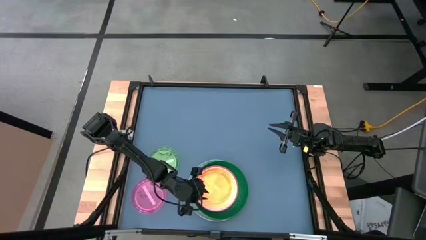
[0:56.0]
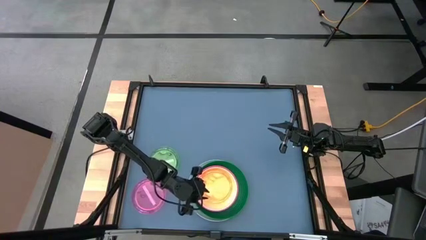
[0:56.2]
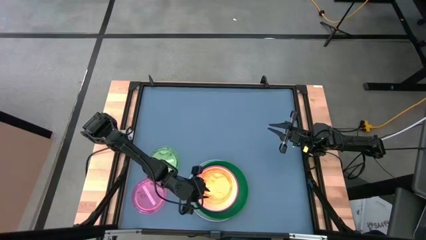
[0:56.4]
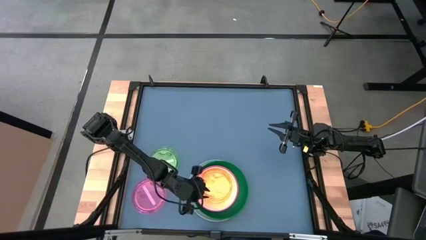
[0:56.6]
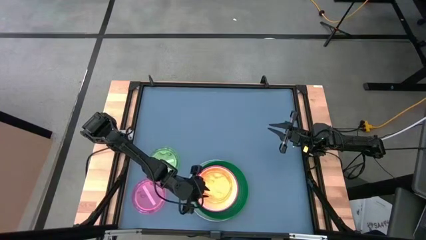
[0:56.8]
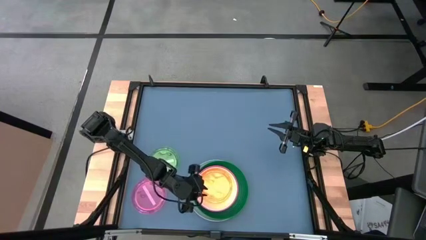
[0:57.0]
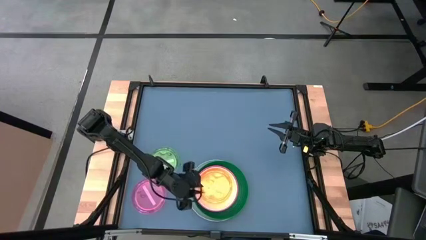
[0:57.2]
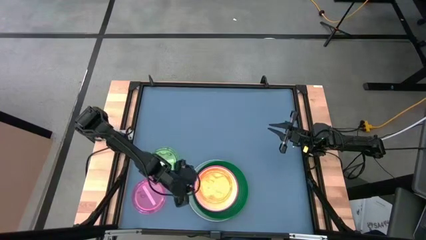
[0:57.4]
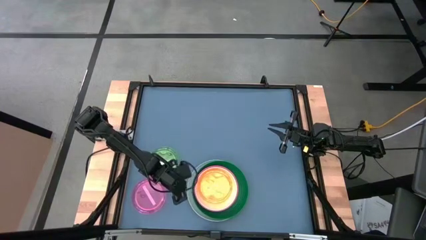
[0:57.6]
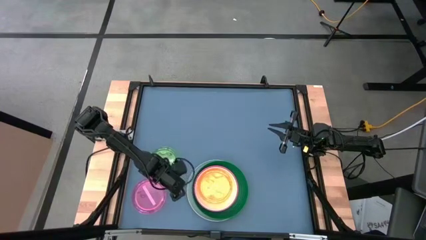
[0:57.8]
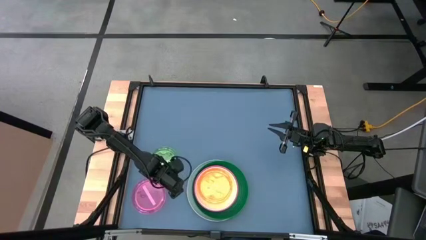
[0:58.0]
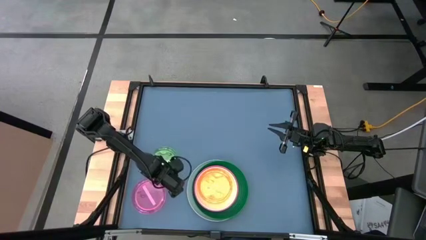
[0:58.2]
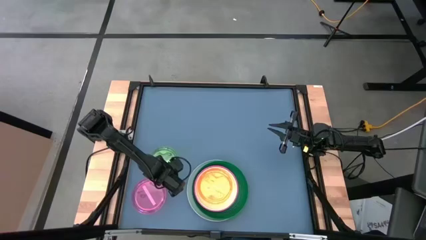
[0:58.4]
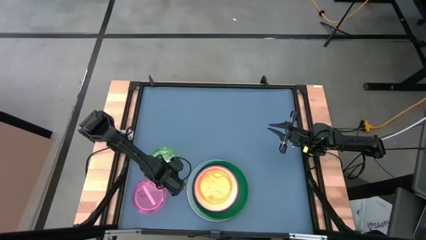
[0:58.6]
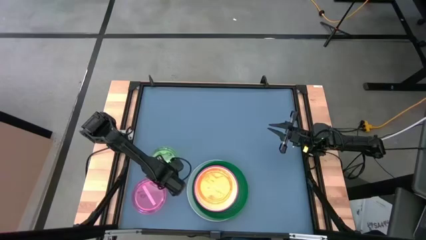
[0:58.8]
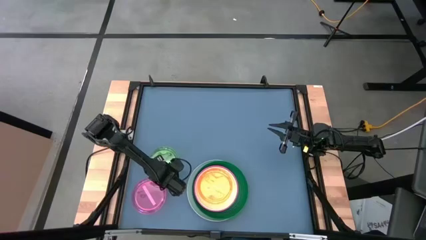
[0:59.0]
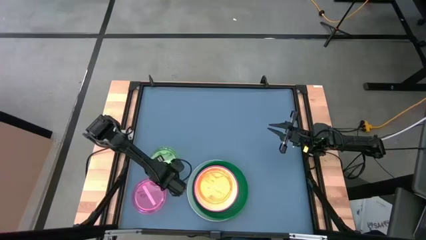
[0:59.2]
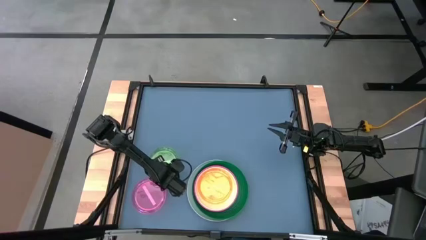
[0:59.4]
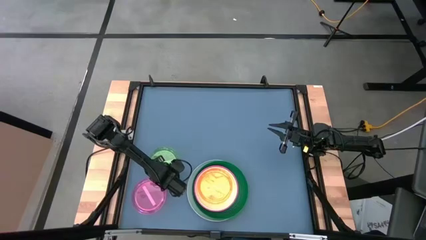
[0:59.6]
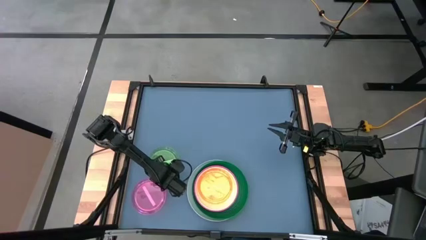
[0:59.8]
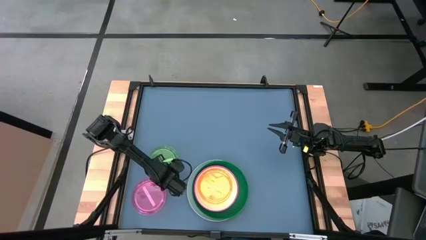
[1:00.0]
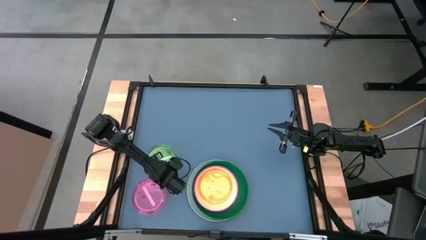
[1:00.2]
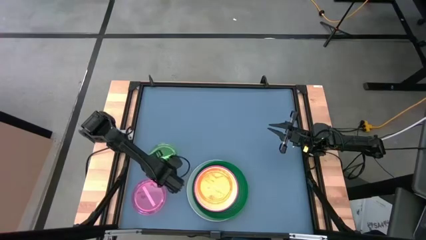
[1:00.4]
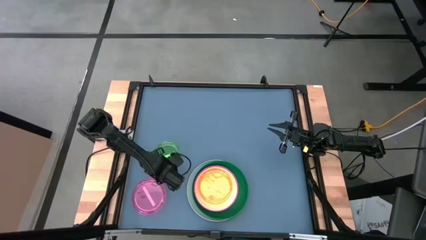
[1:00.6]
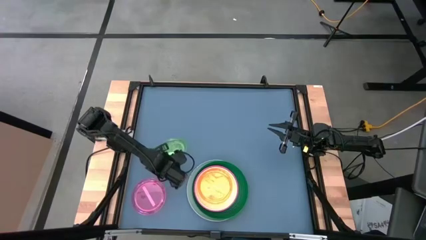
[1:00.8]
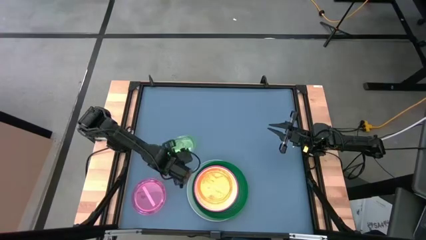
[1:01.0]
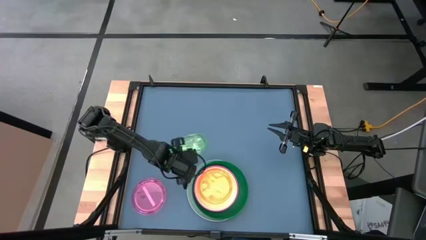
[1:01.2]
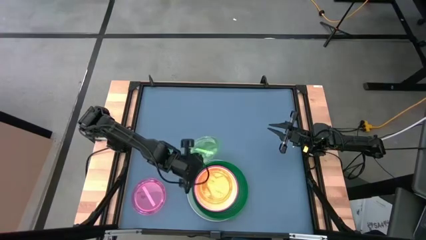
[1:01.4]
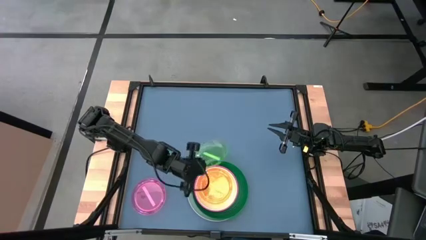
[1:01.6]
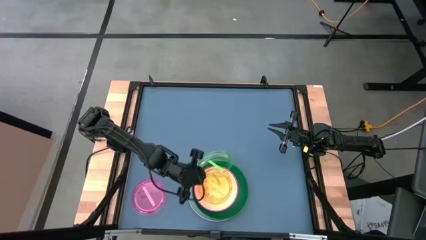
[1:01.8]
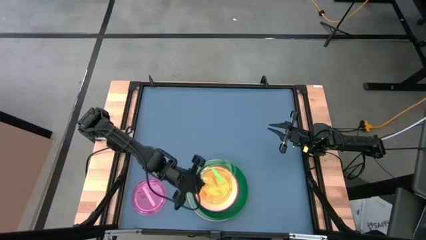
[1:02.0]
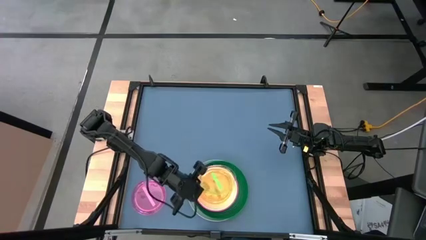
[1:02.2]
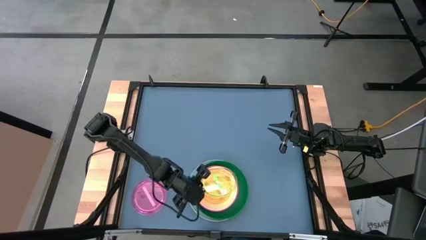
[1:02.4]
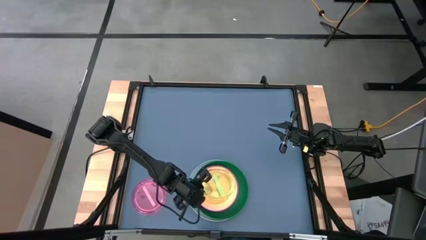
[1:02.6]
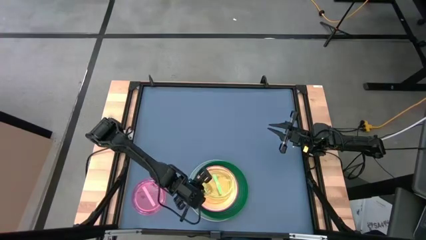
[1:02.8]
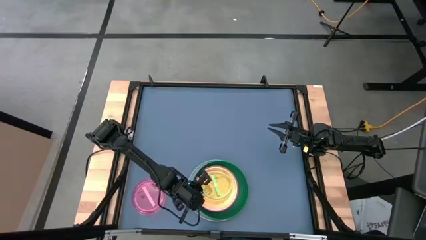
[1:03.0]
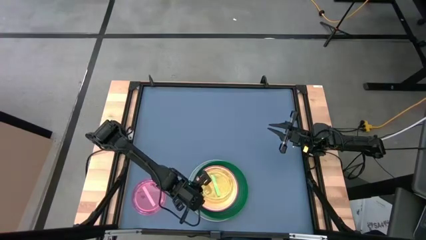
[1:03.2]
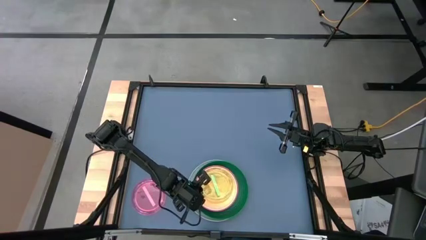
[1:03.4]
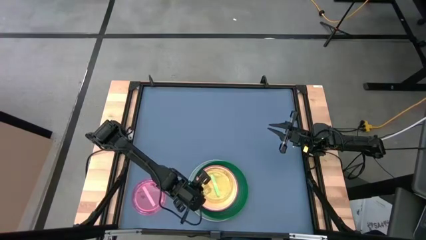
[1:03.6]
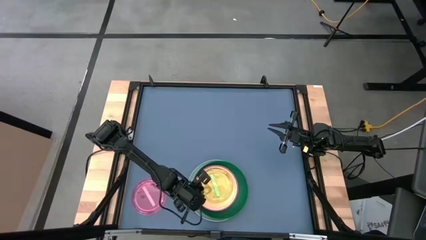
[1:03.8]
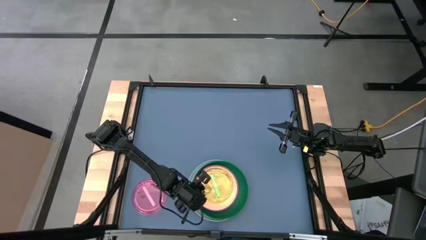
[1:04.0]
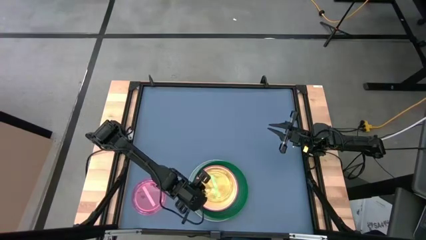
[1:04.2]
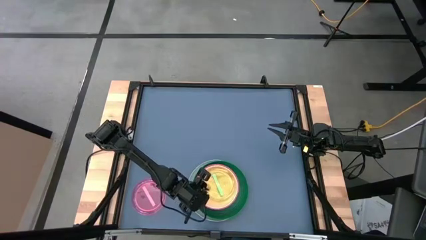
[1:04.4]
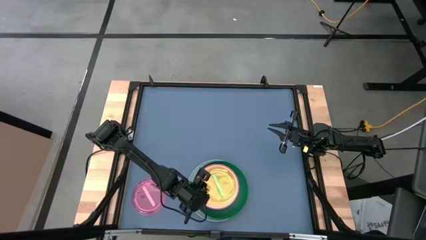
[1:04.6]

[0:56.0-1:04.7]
Task: Stack plastic plates
Stack the green plate on the orange plate

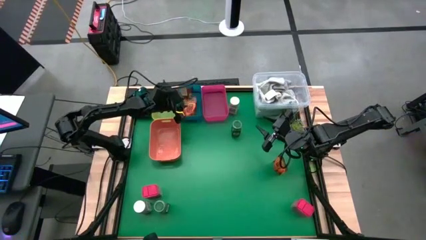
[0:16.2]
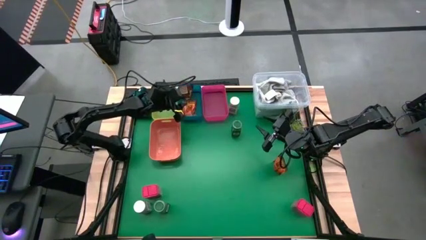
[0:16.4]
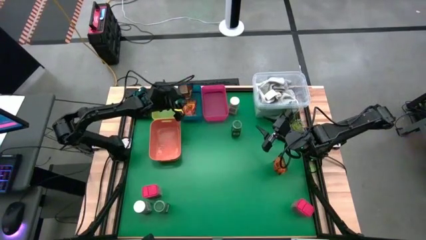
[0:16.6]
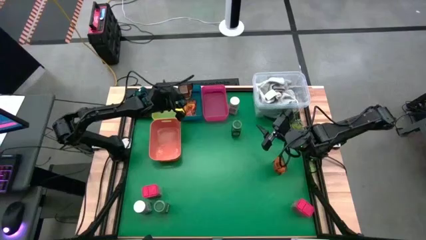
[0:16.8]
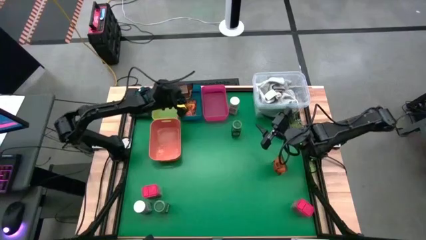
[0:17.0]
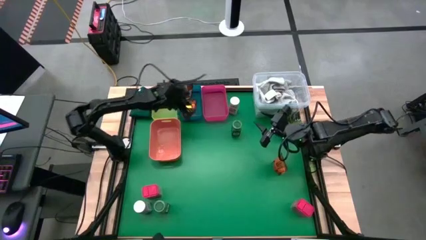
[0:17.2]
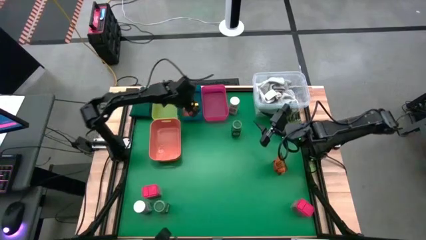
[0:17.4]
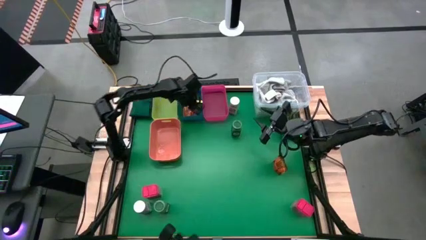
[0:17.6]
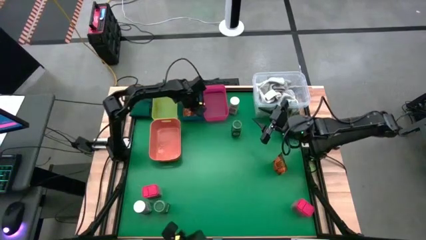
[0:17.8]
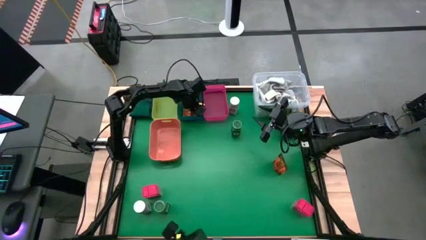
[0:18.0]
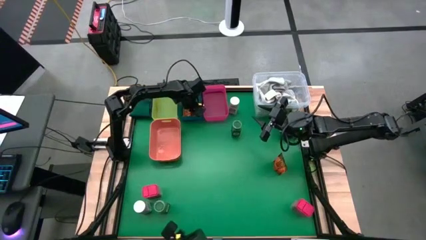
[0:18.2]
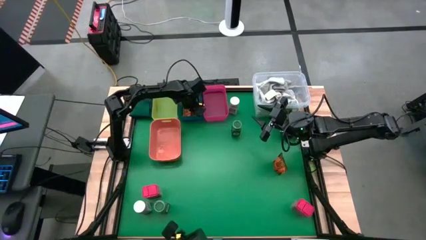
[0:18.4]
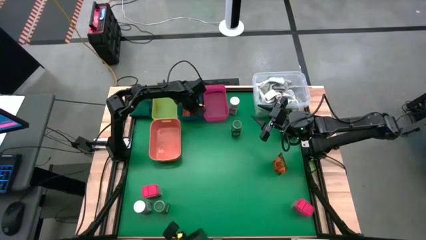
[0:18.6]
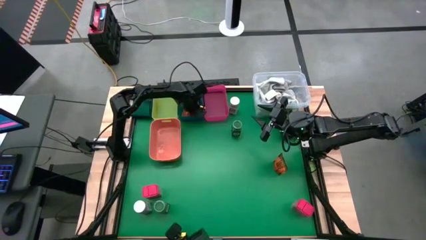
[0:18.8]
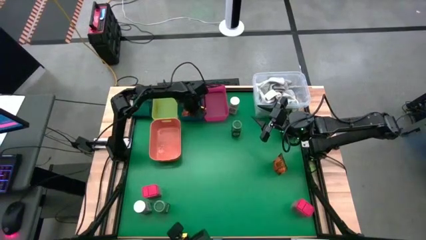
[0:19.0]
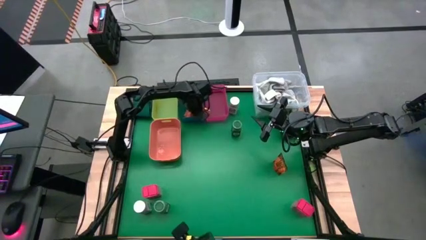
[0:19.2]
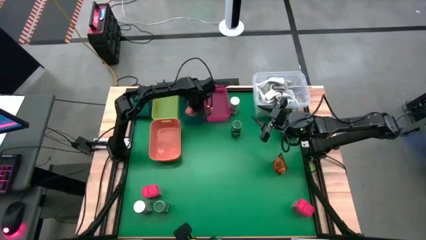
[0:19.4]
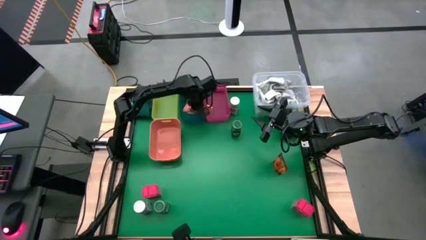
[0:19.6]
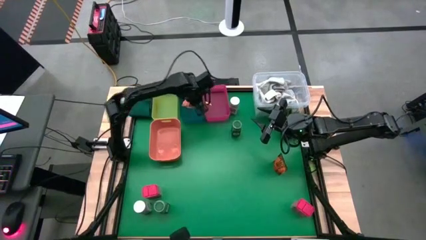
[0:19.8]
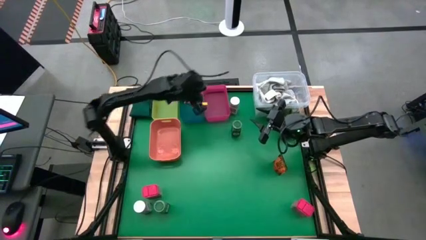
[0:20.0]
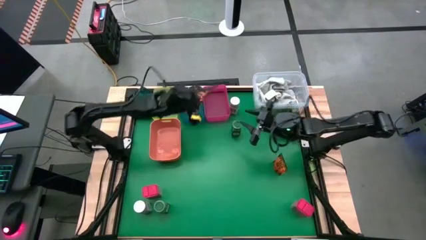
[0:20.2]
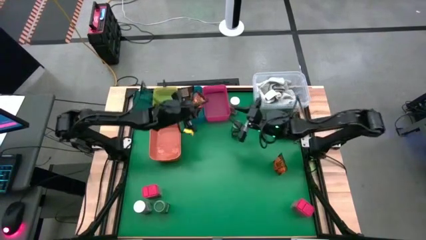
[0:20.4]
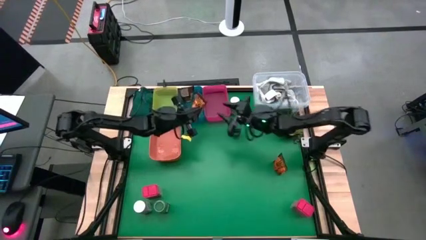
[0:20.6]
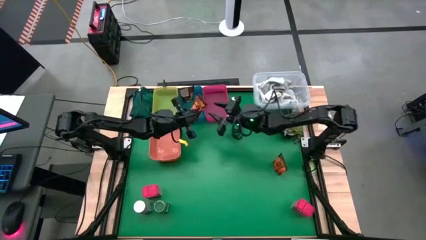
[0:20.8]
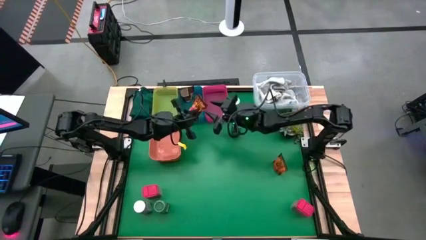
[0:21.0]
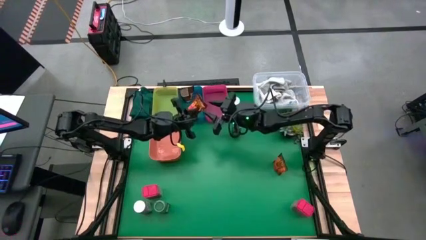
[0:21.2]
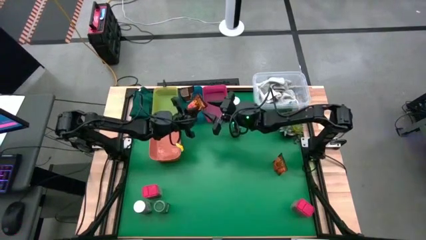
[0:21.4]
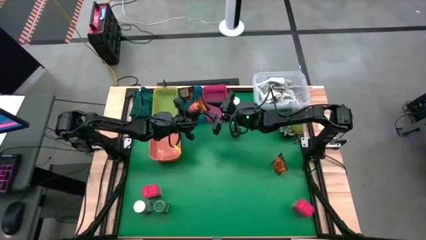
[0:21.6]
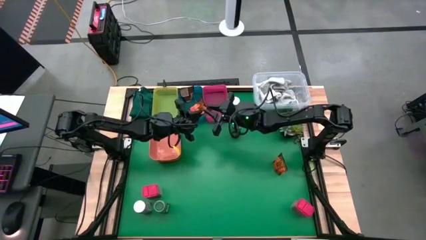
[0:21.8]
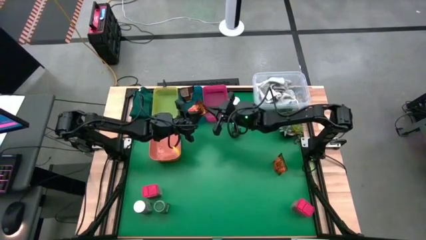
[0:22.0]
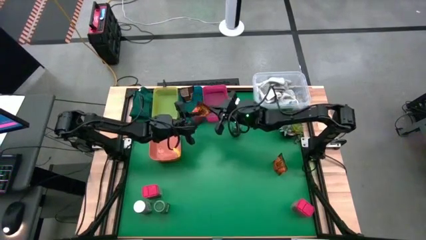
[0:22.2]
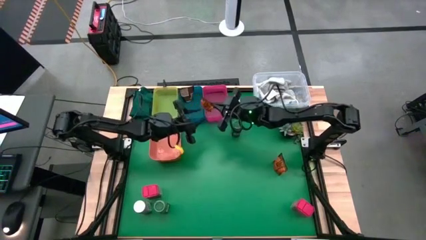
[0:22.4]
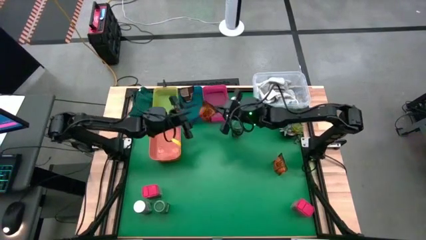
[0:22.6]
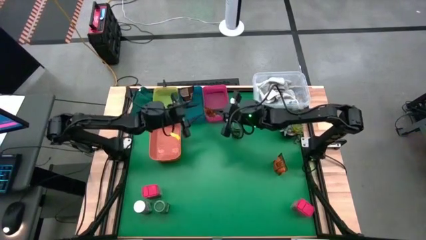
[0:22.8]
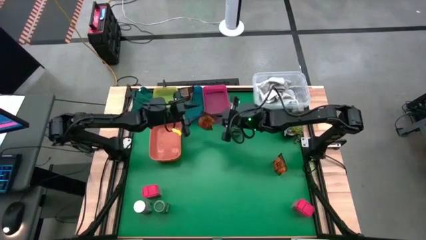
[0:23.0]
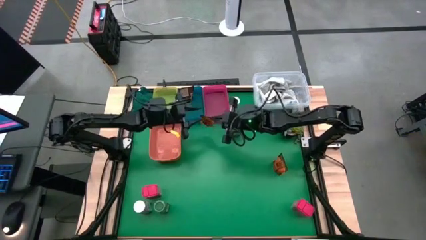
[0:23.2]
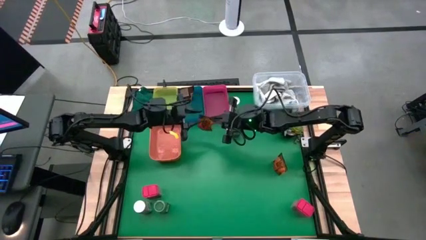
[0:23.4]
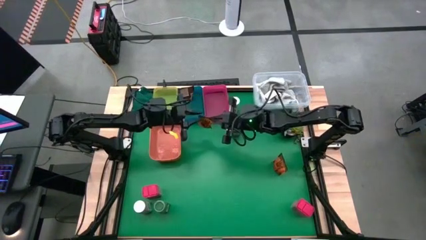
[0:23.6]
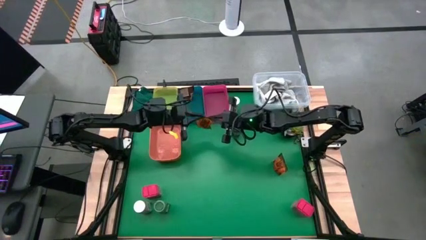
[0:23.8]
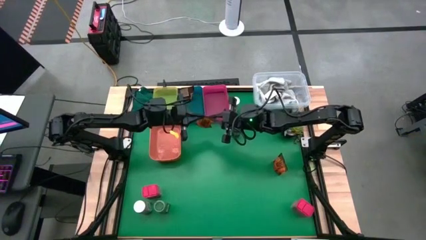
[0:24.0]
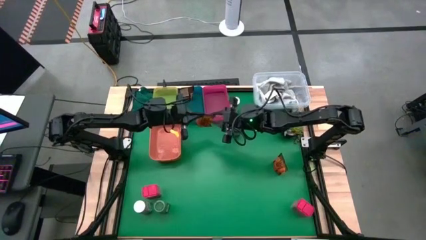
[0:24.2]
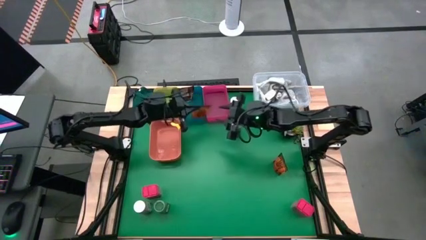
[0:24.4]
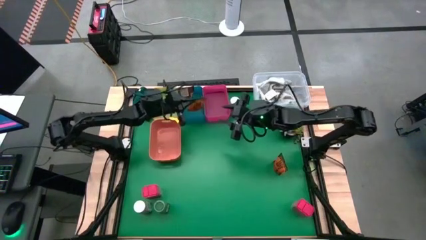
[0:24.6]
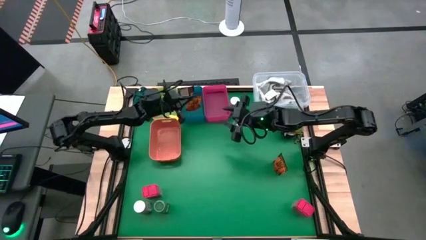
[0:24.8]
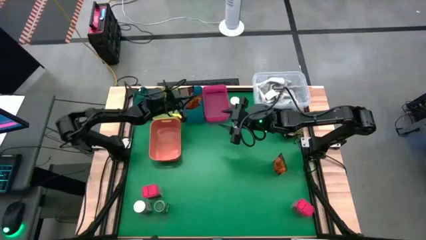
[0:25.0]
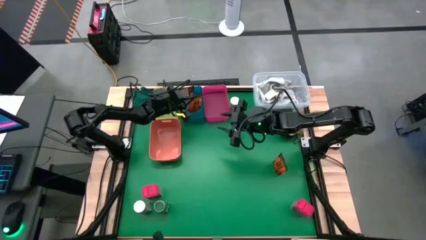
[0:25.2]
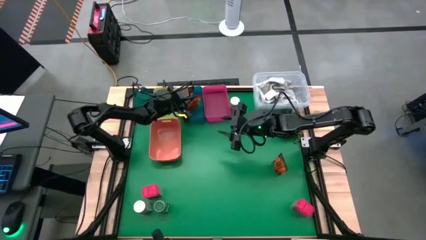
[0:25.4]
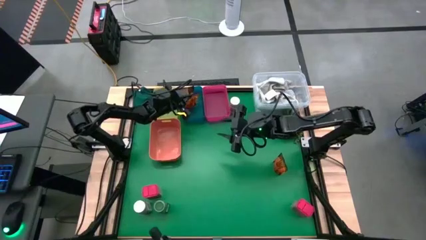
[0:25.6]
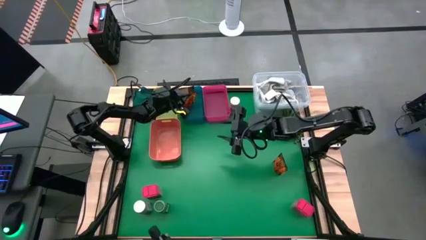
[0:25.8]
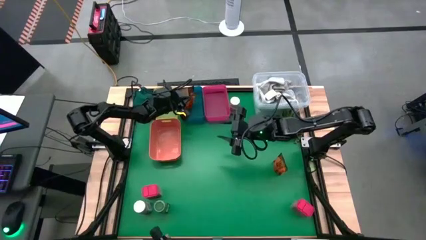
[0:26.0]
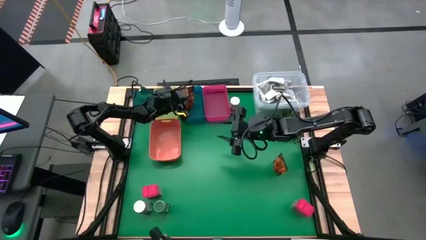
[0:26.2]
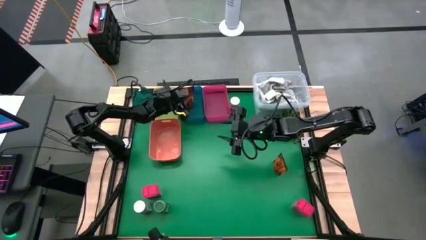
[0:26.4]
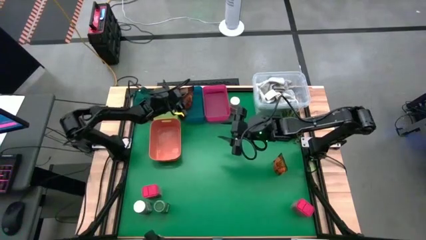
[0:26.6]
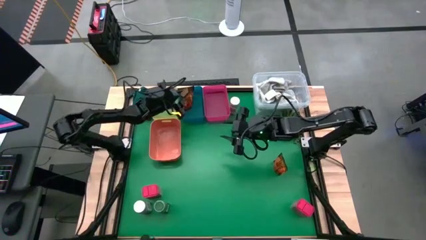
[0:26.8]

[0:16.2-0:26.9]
Task: Sort spices by type
Put the top orange spice bag into the blue bin
